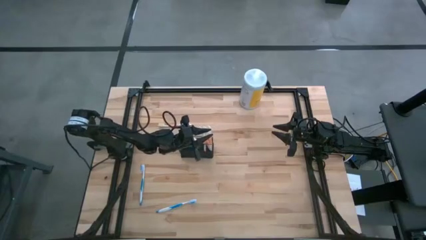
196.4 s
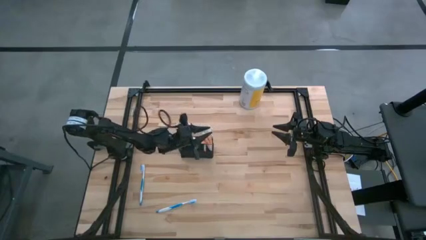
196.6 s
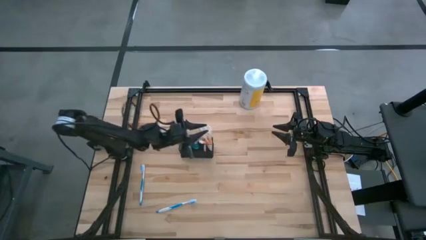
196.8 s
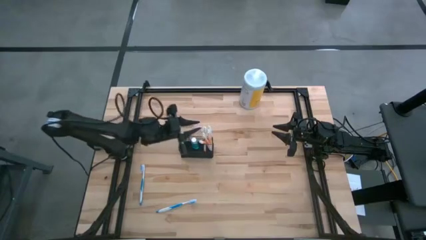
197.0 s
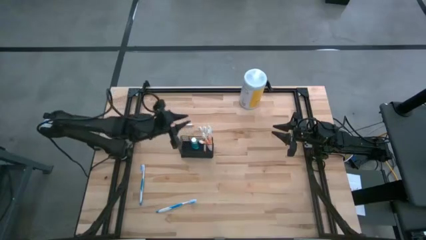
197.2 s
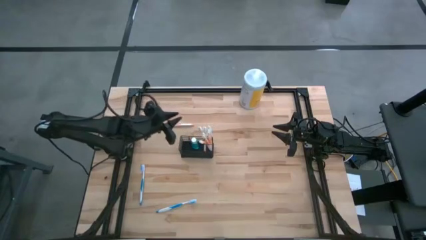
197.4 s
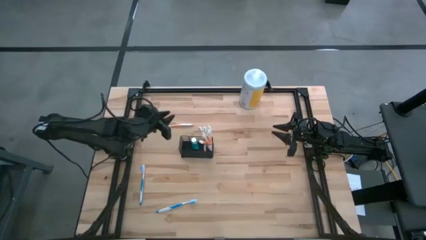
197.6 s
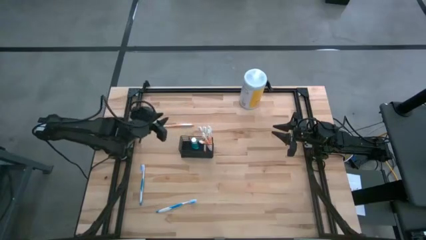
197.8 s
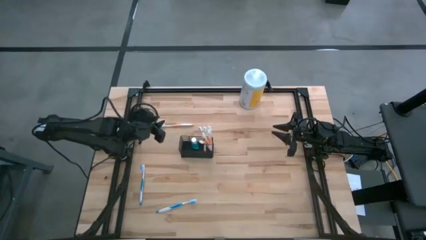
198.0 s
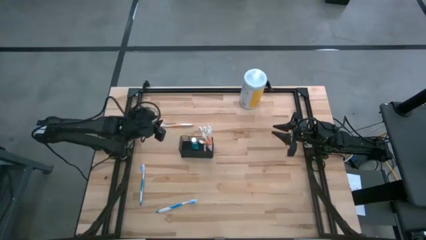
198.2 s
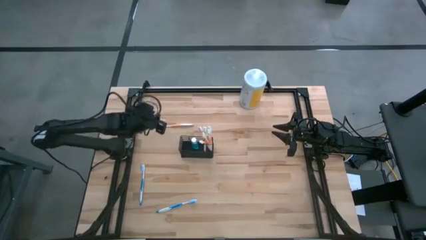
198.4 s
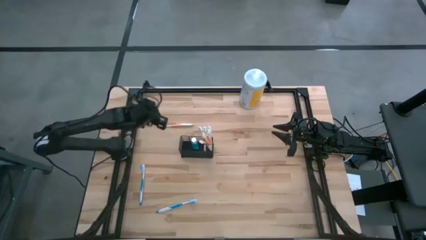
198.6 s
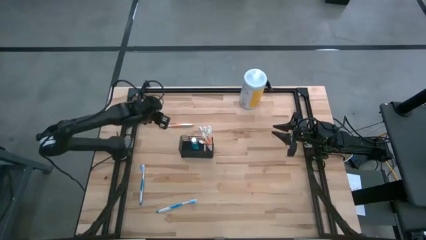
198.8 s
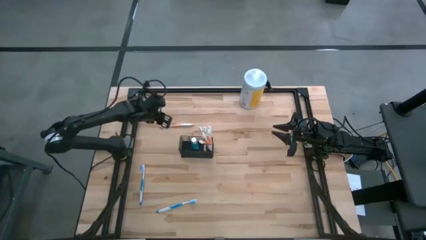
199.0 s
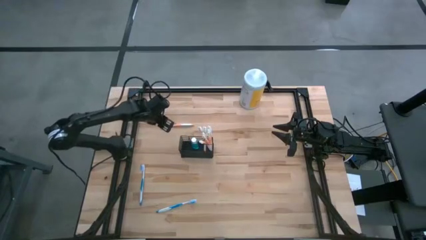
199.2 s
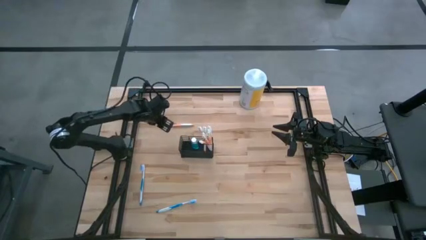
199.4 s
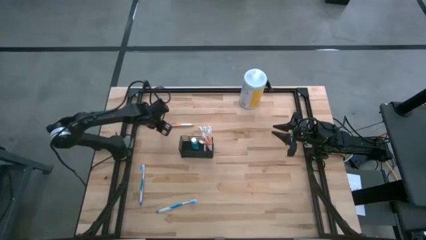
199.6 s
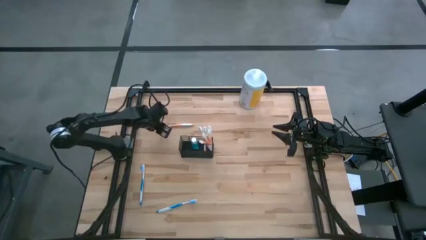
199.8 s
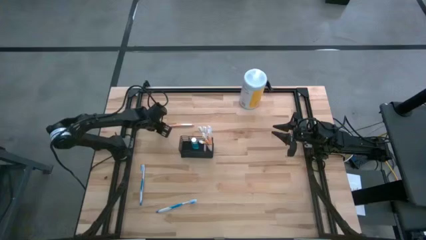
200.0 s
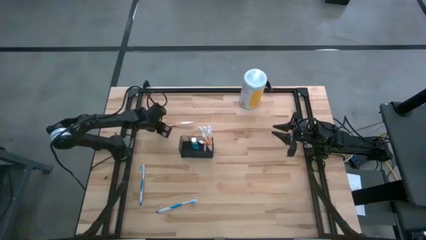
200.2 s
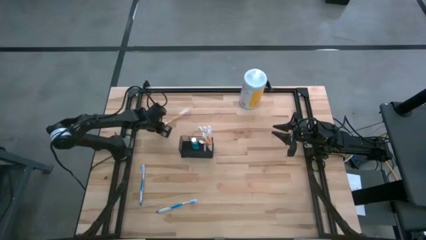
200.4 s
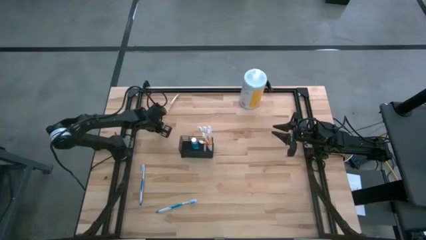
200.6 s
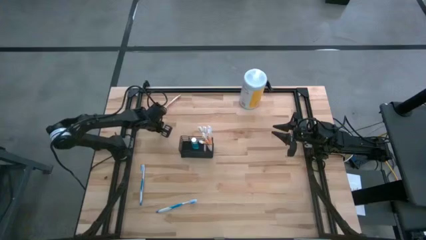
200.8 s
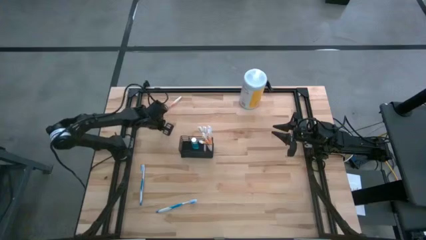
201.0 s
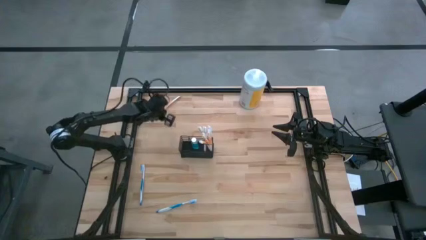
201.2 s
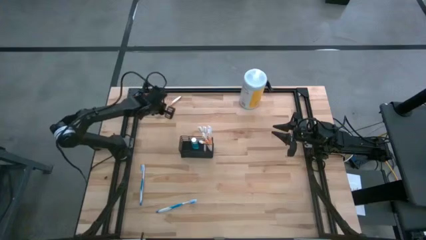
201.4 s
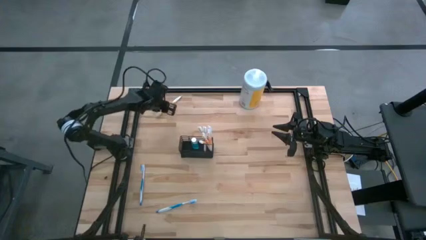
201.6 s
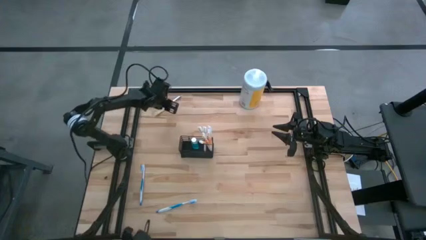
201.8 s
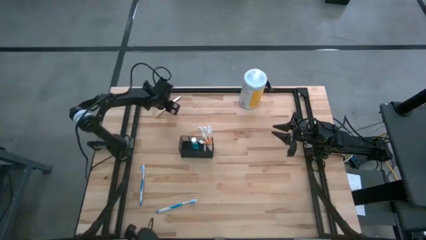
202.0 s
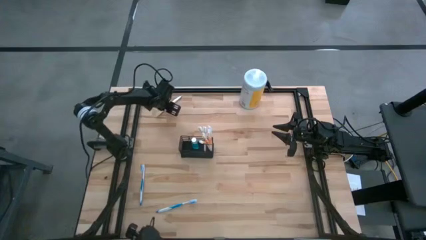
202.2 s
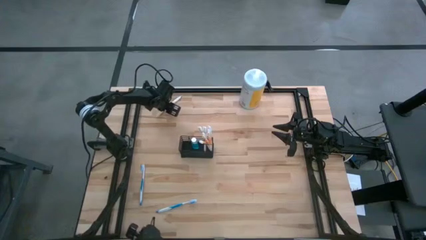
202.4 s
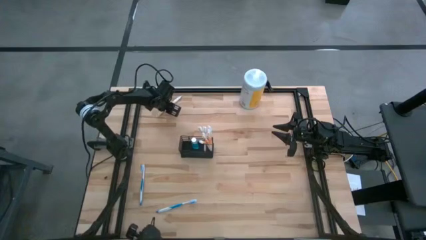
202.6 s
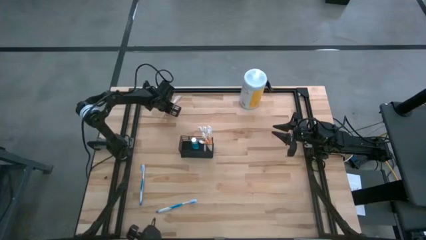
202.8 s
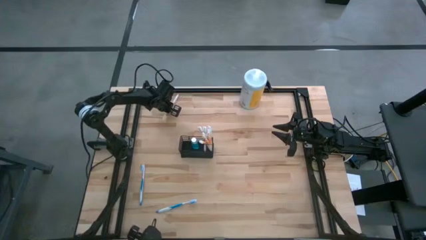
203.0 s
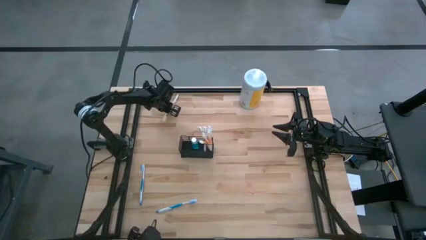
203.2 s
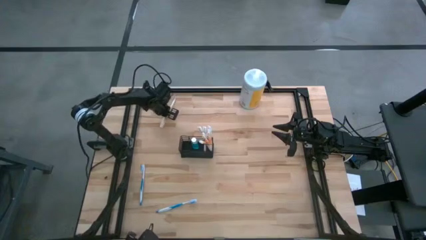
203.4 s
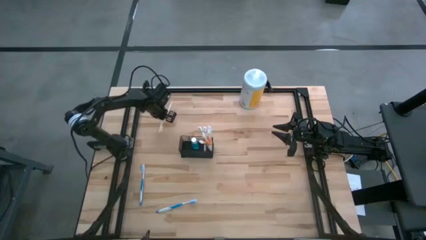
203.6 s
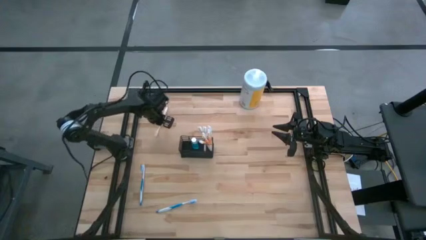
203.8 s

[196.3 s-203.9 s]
Task: Pick & Place toothbrushing station
Put the orange toothbrush into the right section of the wire organizer

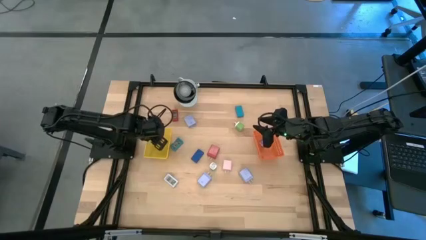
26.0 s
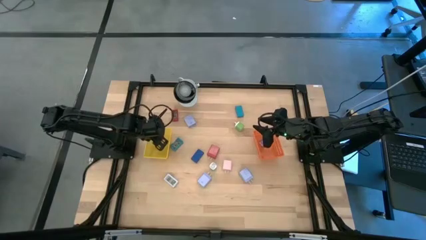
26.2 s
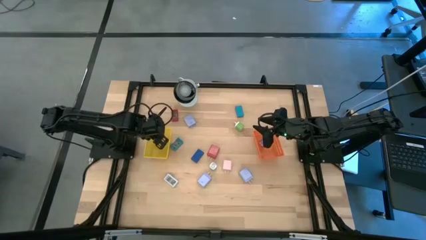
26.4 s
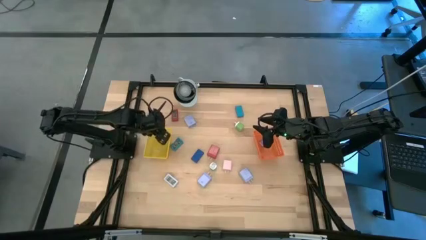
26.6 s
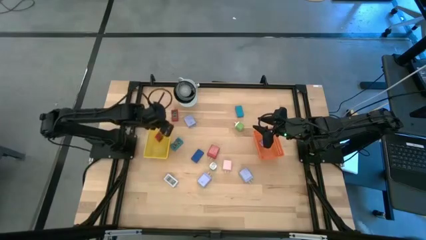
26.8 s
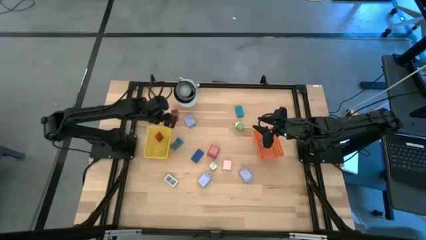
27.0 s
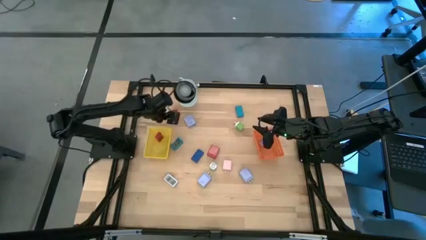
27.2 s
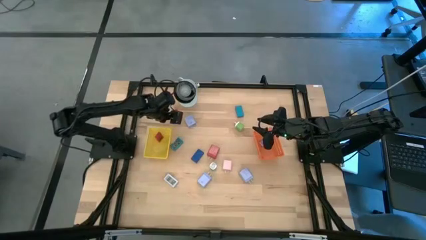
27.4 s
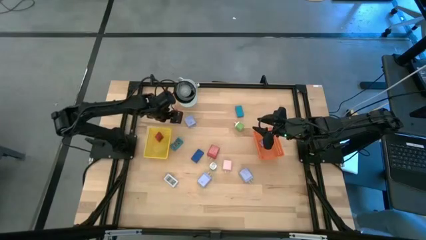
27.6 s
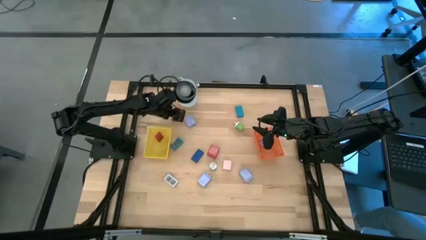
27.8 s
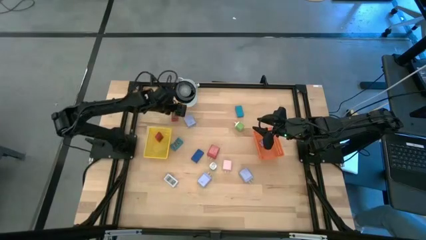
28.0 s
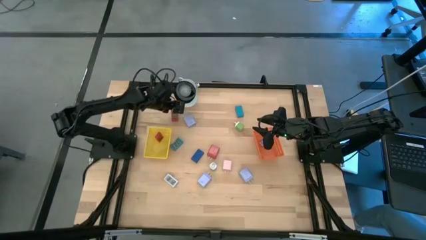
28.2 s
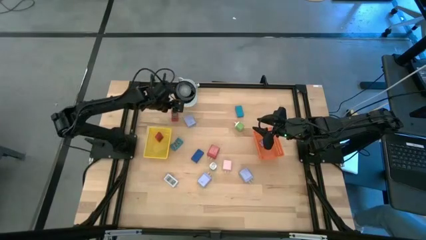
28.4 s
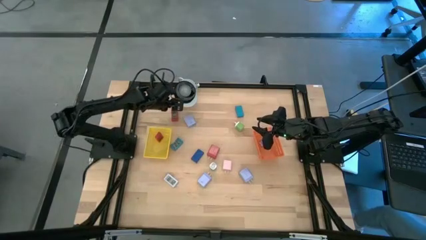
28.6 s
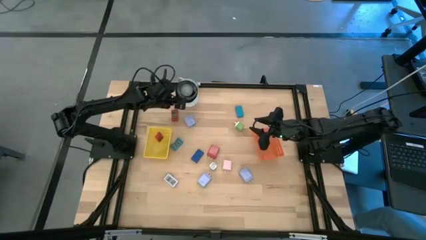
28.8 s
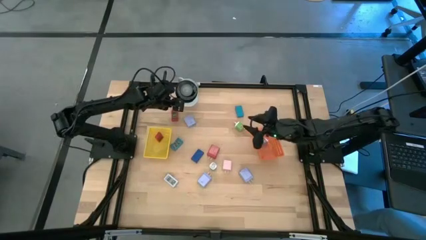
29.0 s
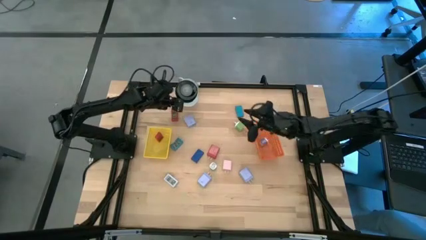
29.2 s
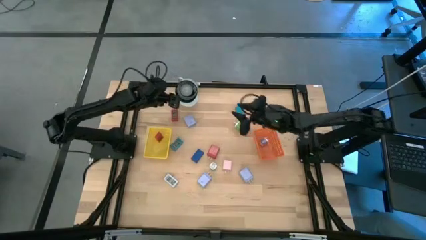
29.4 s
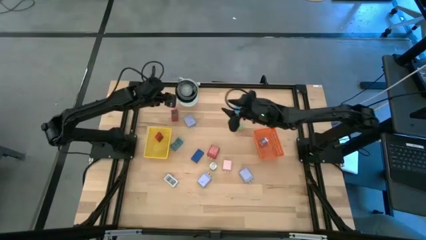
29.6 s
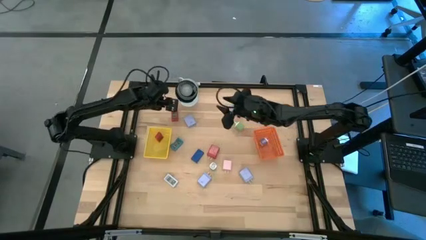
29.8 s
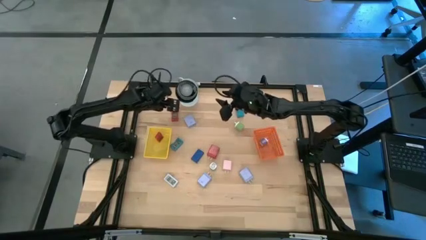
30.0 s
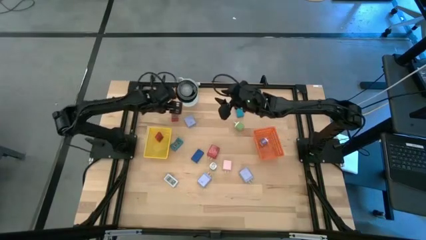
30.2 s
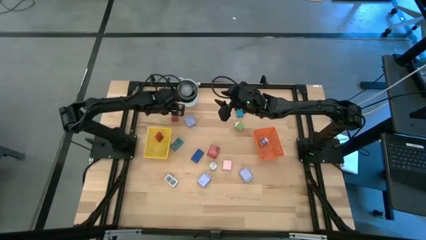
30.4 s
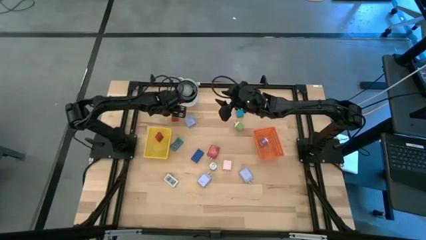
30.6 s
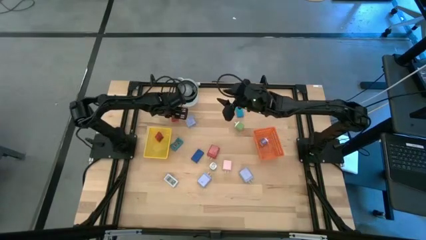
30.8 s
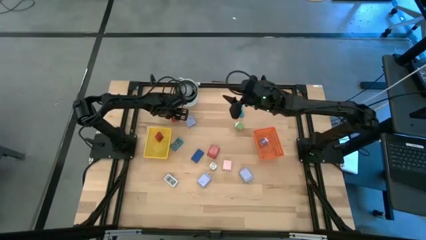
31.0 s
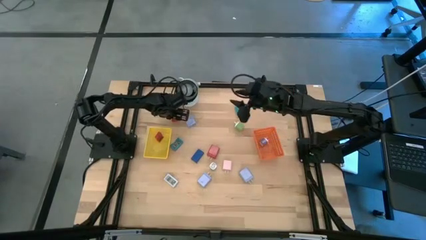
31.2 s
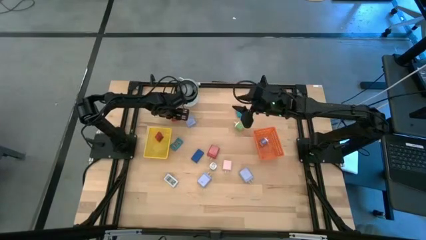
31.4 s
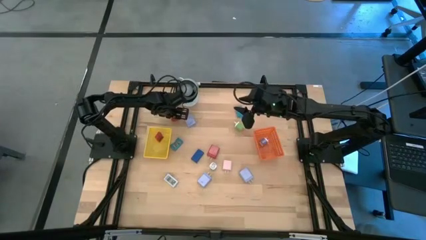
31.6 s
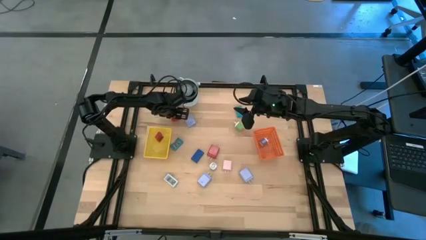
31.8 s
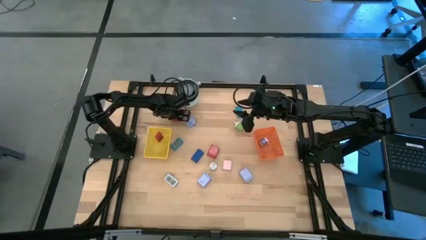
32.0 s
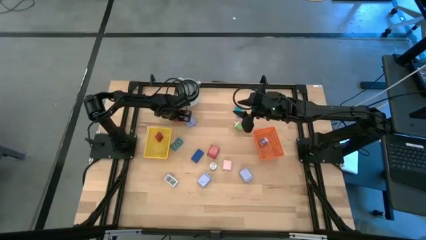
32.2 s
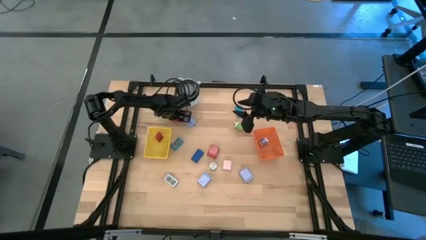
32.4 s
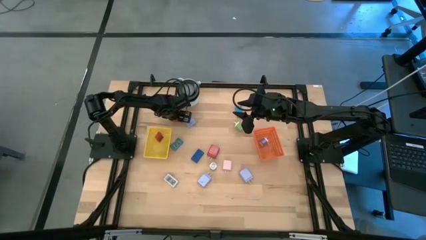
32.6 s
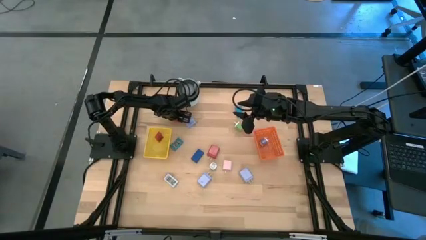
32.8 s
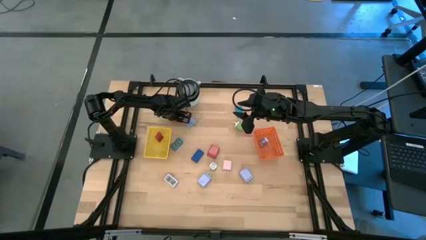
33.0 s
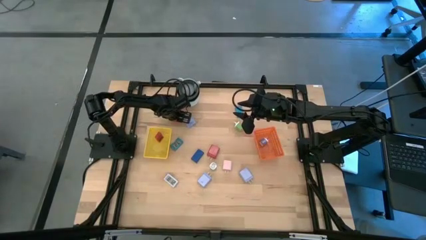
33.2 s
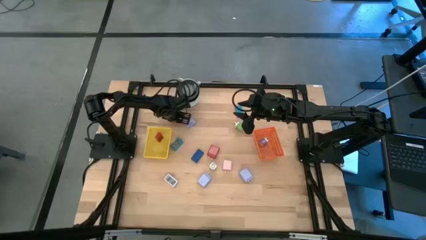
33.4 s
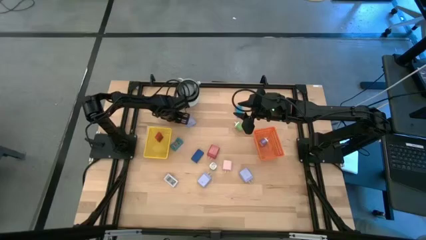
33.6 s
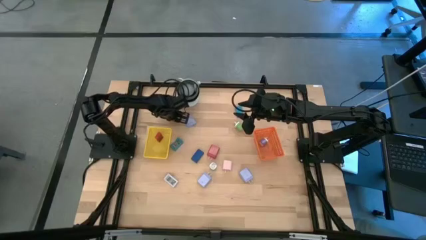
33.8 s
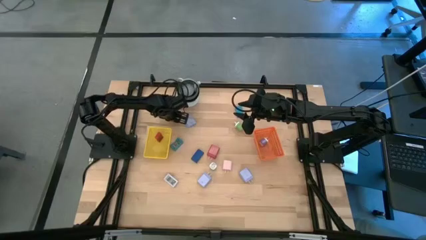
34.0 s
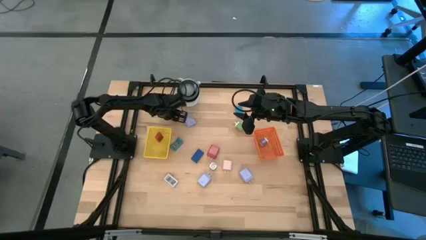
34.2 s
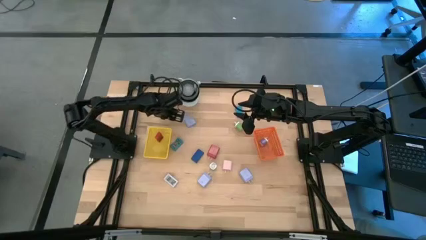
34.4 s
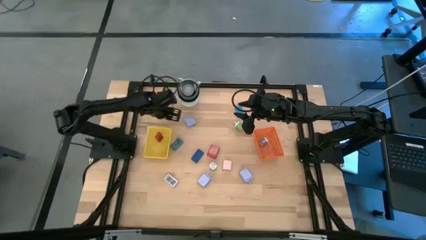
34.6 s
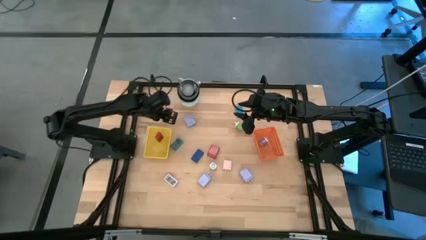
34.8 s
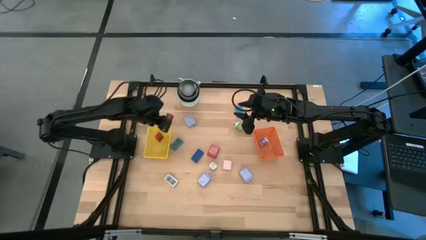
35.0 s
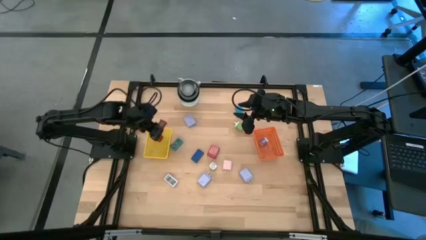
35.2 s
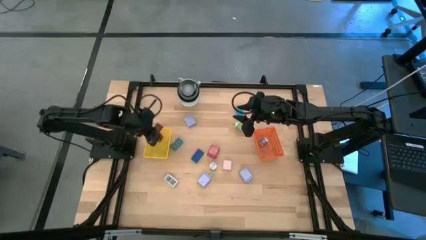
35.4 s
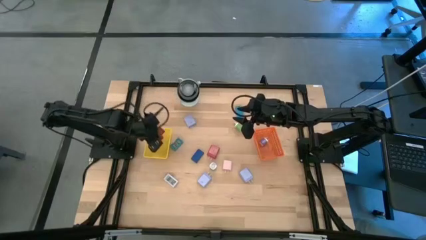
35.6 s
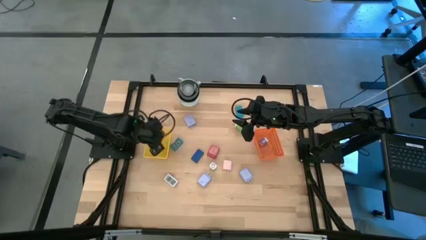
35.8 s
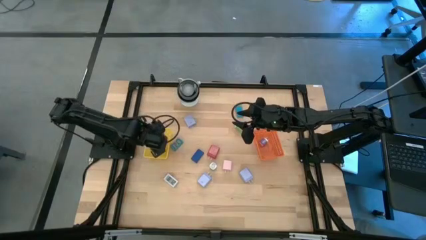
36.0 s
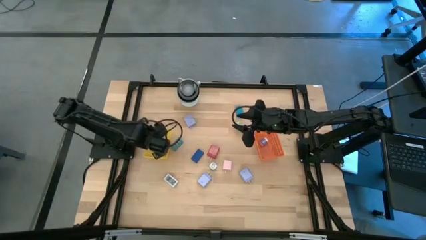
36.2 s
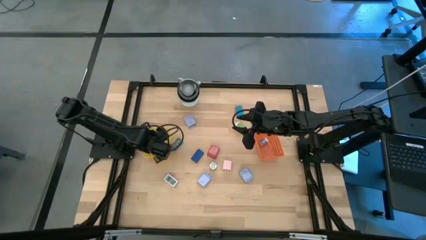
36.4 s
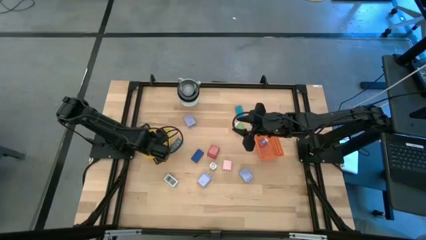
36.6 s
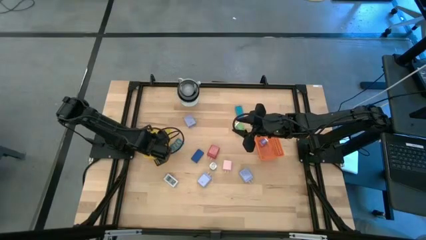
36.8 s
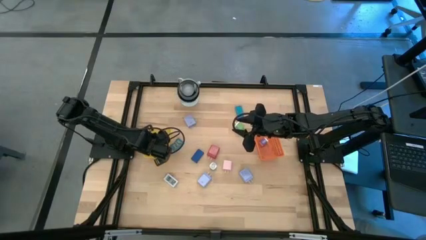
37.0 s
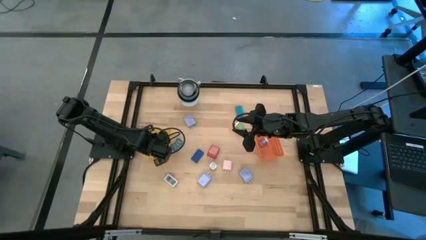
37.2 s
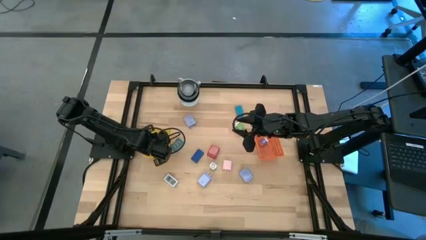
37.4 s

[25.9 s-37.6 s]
Task: Pick & Place Office items
Put the red digital clock into the yellow basket
